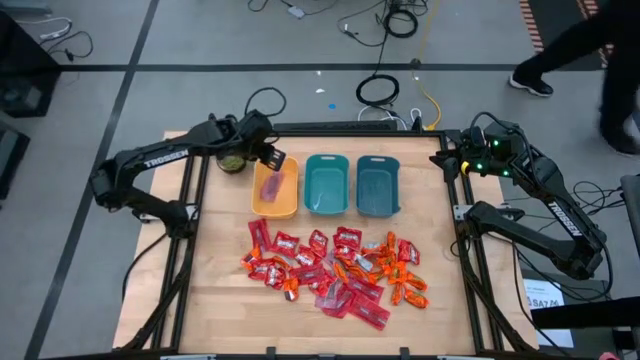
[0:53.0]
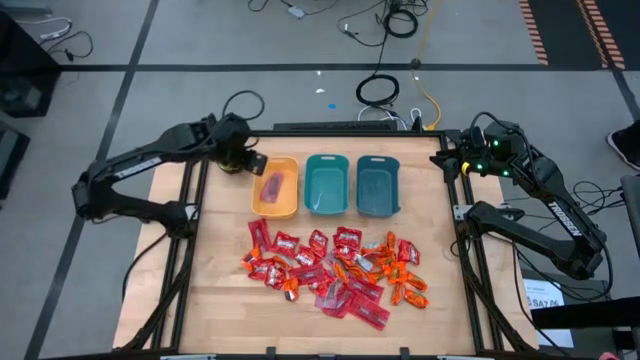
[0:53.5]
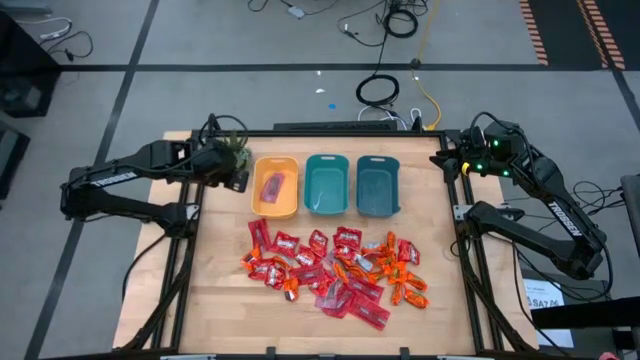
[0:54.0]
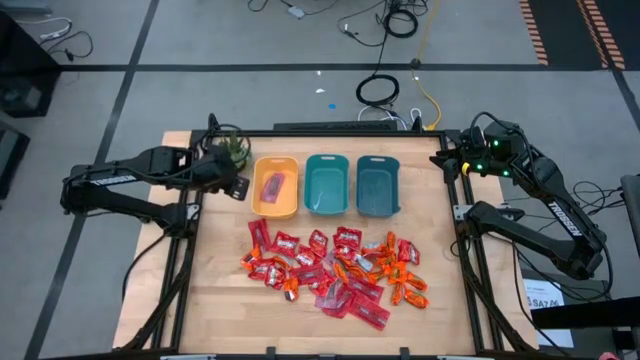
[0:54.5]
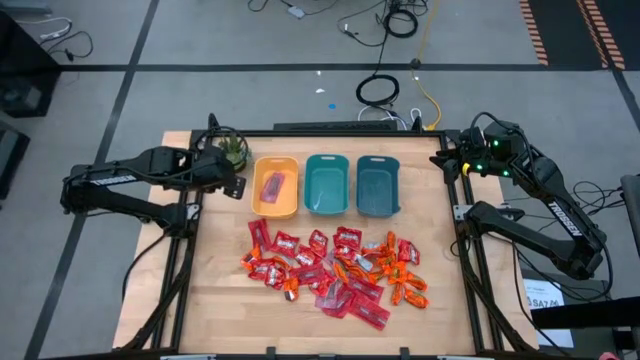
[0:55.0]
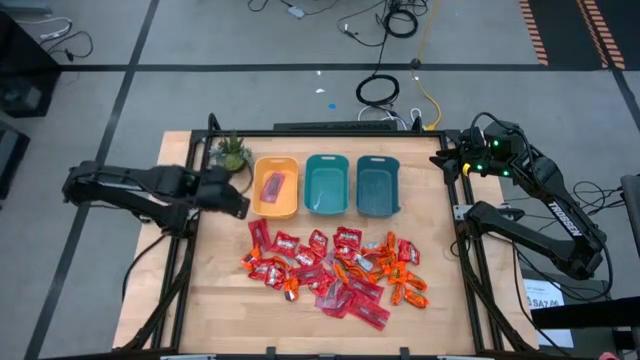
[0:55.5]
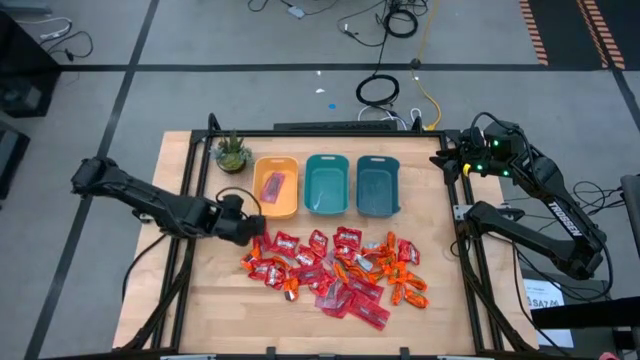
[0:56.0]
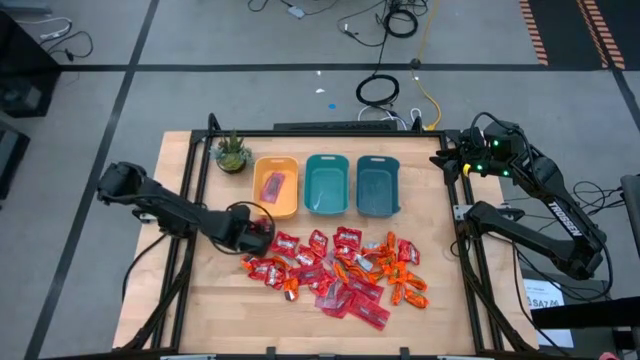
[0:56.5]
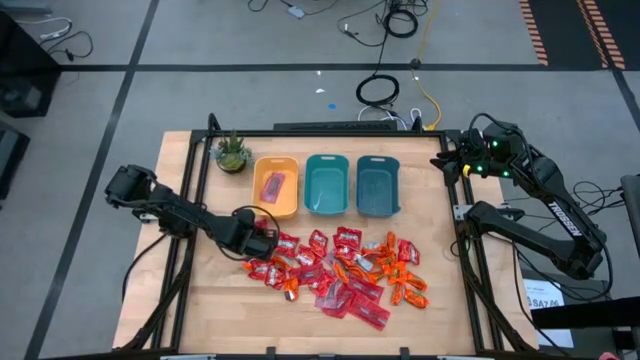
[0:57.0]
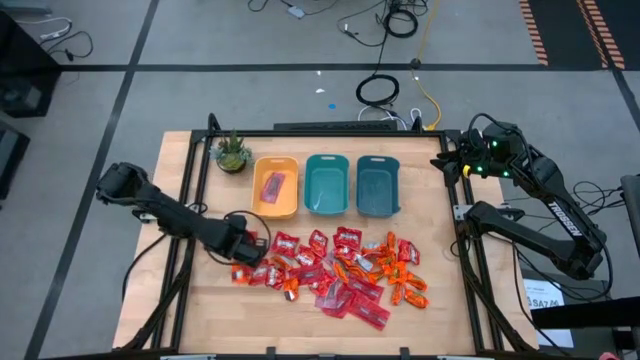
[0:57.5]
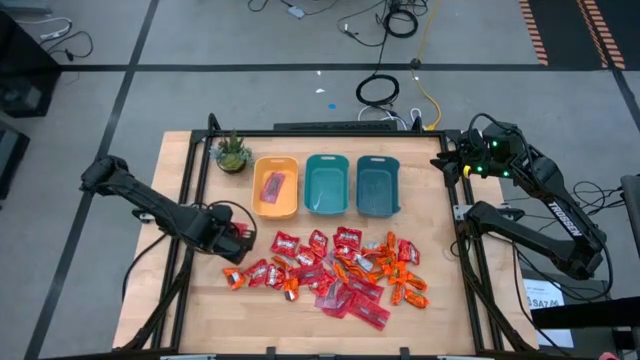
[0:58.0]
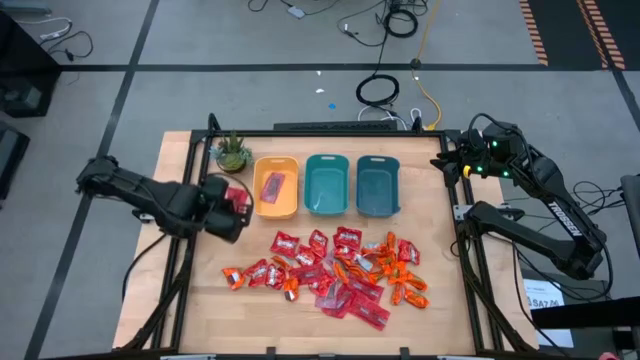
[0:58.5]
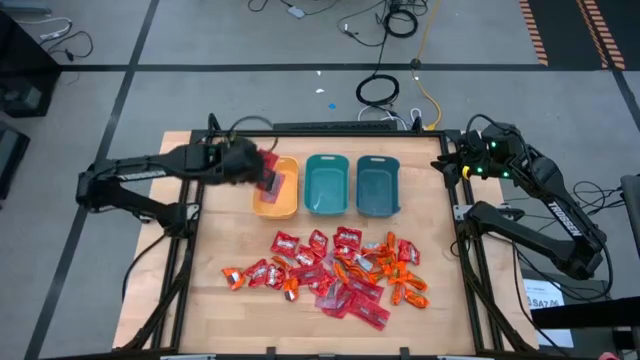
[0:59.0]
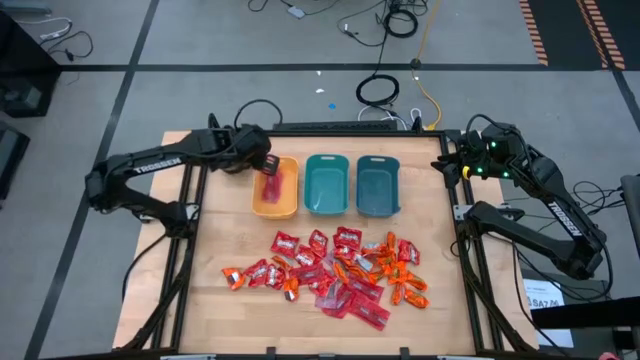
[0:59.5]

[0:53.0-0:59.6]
Task: Sort candy
Put the red candy into the top left yellow bin

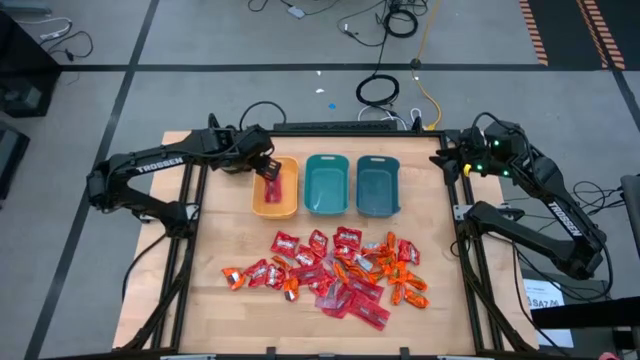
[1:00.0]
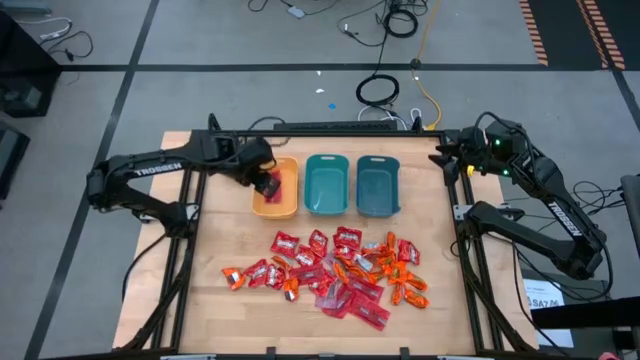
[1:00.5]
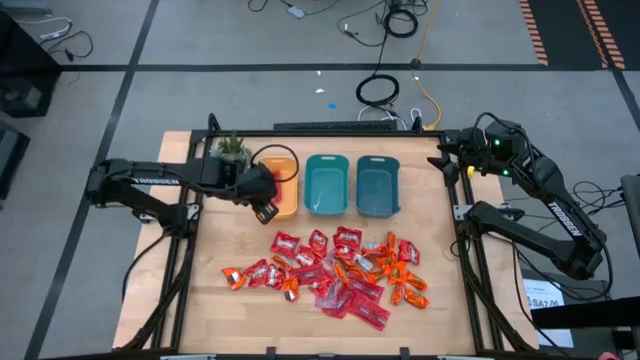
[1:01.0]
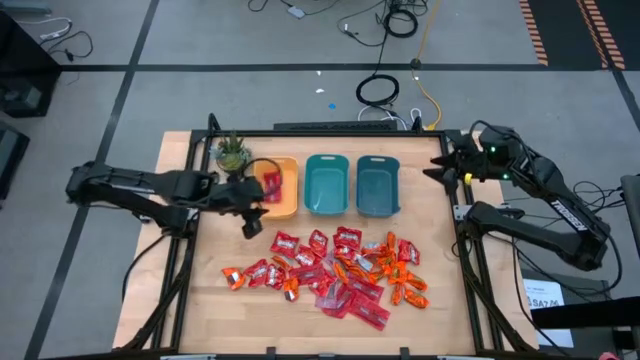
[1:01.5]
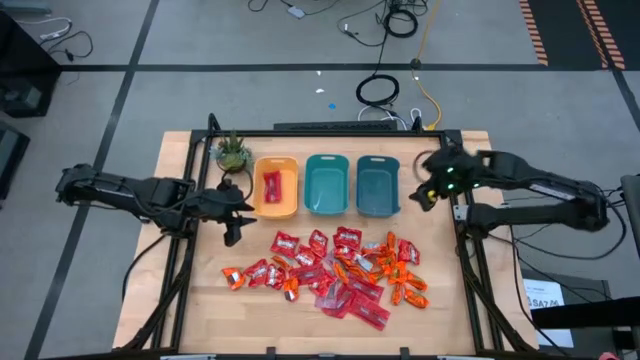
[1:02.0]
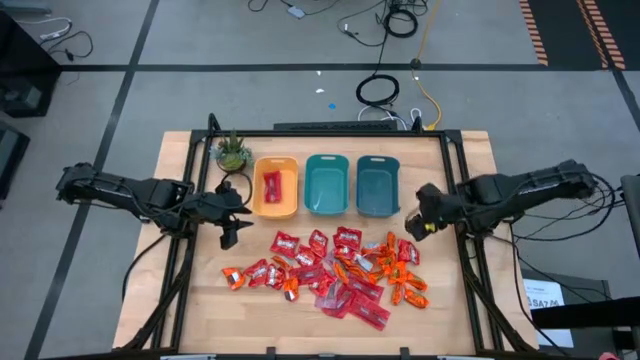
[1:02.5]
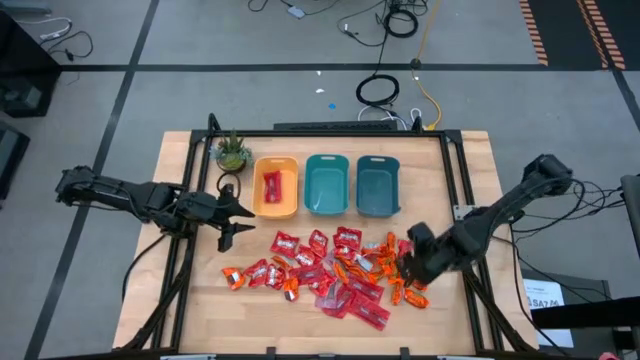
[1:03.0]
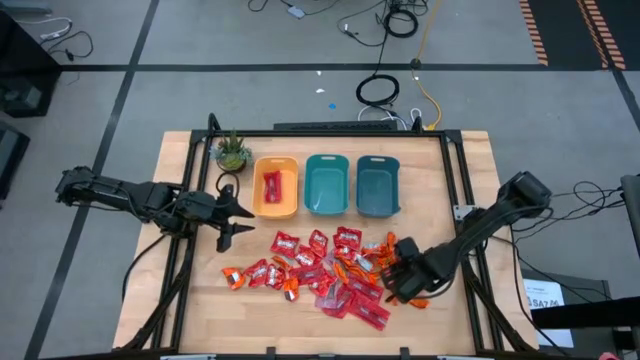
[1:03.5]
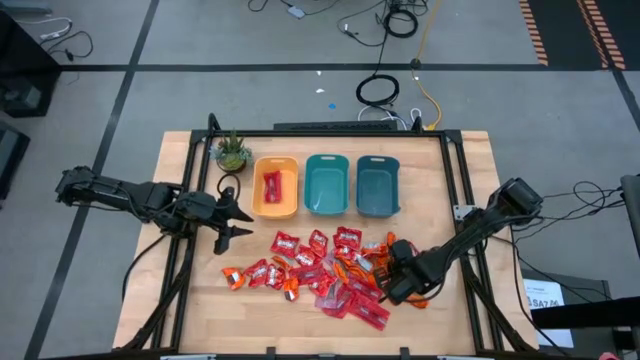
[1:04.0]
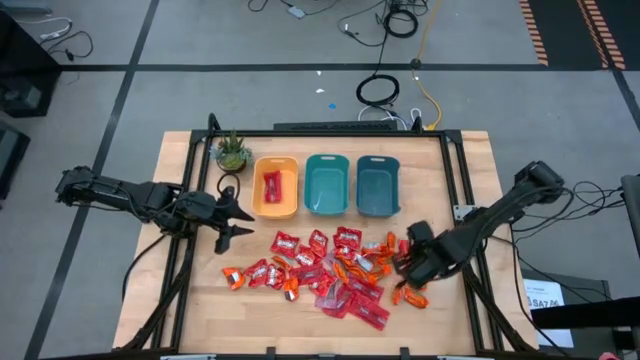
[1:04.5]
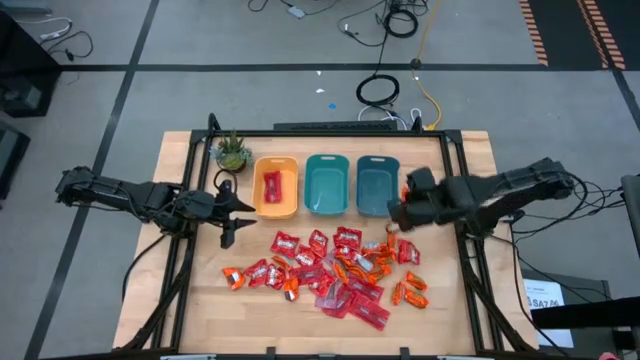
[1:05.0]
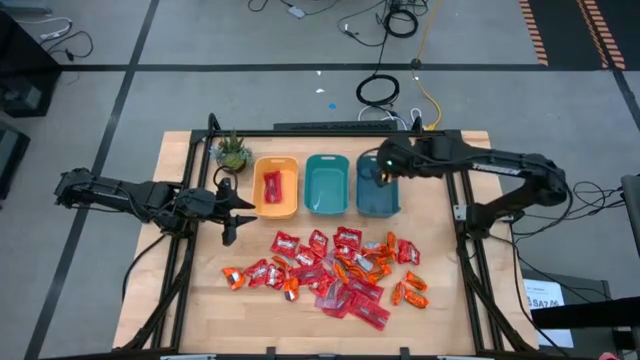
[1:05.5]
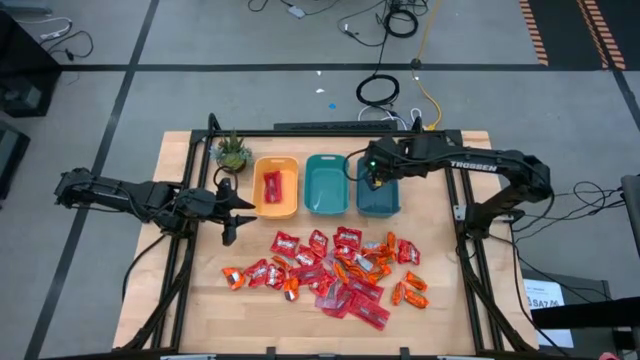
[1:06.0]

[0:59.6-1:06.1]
Put the orange candy into the top right blue bin

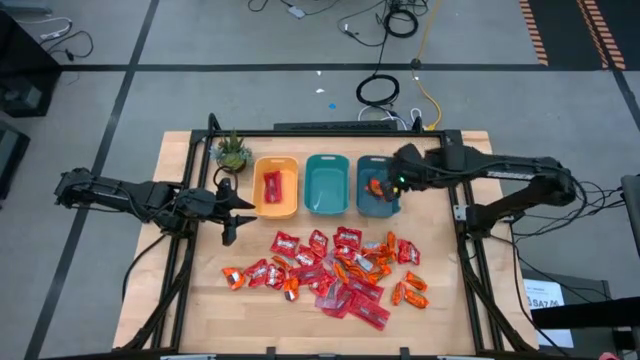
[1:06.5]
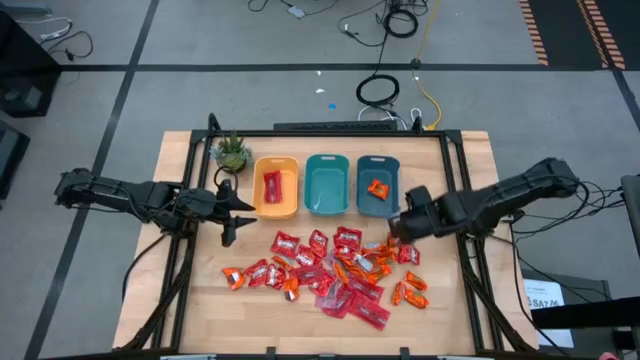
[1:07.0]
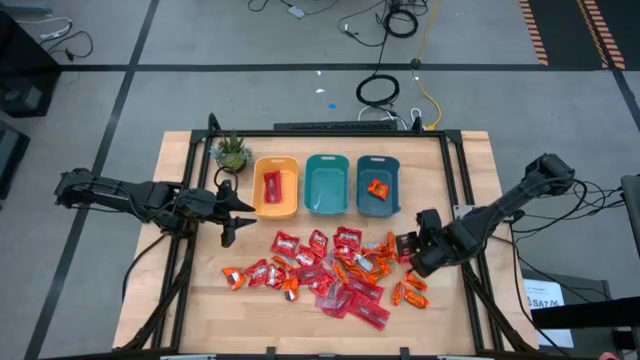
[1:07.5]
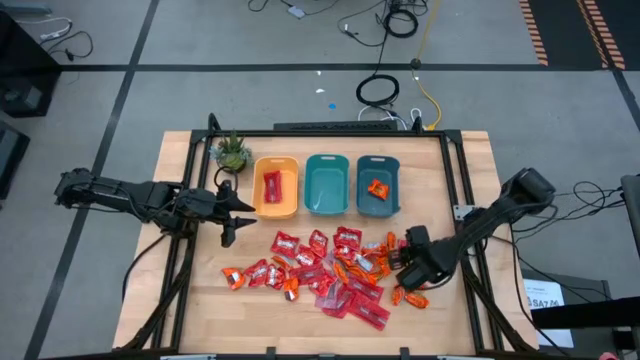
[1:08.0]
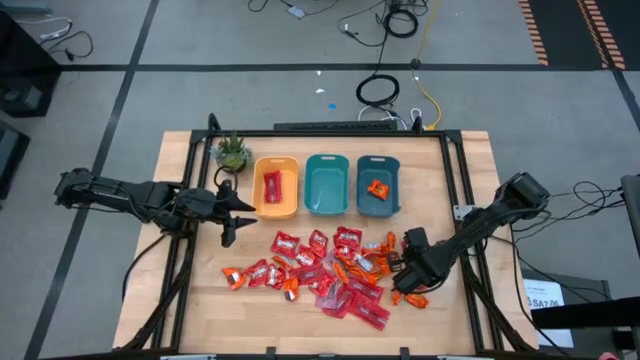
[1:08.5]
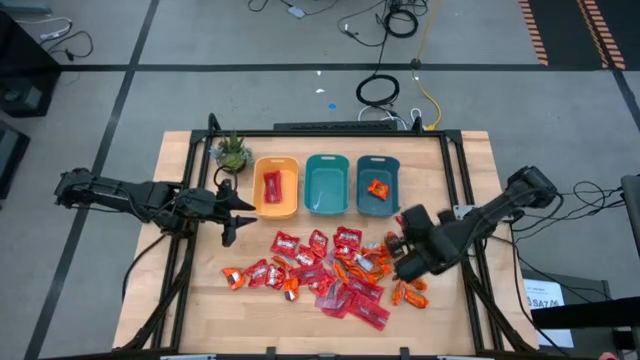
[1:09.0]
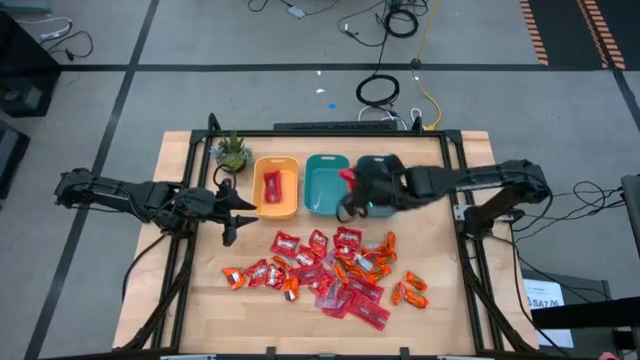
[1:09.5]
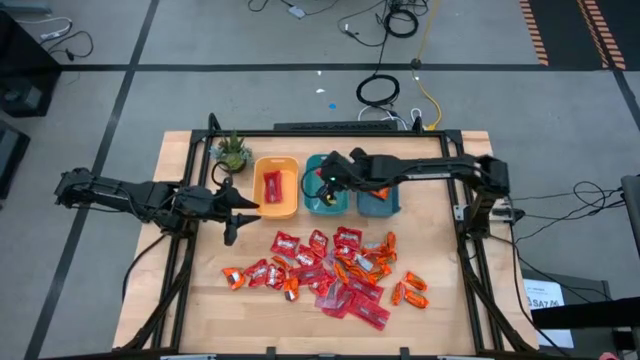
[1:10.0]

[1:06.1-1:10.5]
Put the red candy into the top center green bin

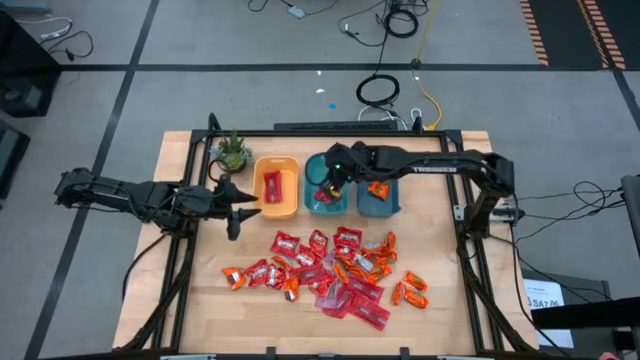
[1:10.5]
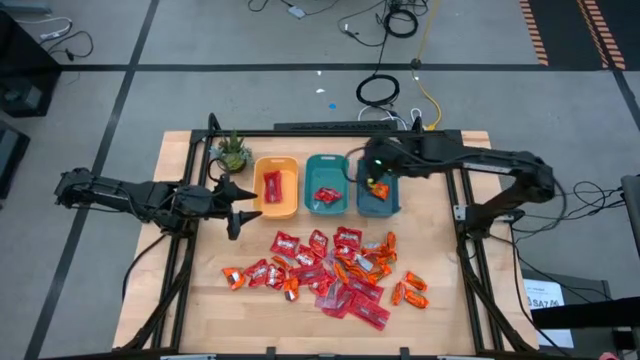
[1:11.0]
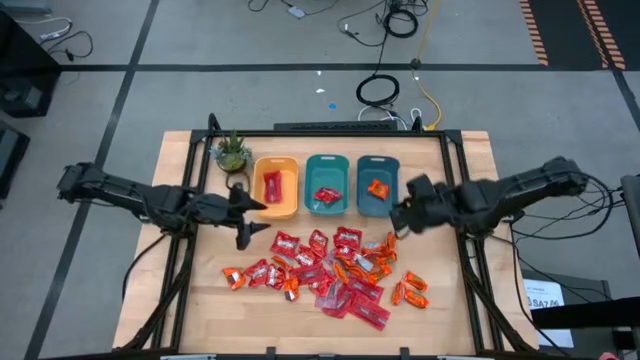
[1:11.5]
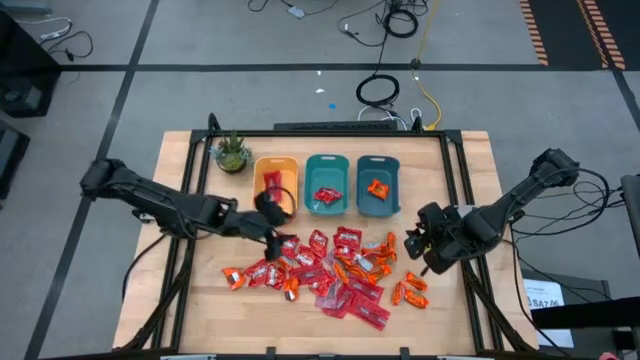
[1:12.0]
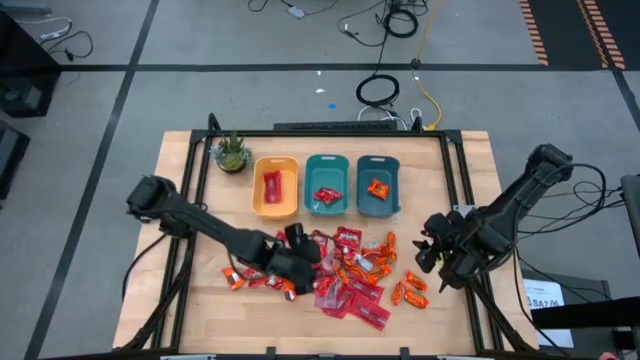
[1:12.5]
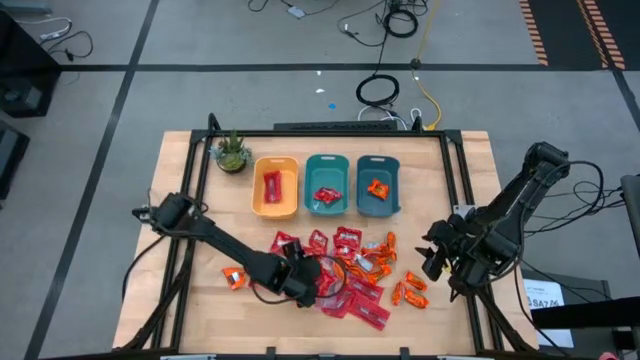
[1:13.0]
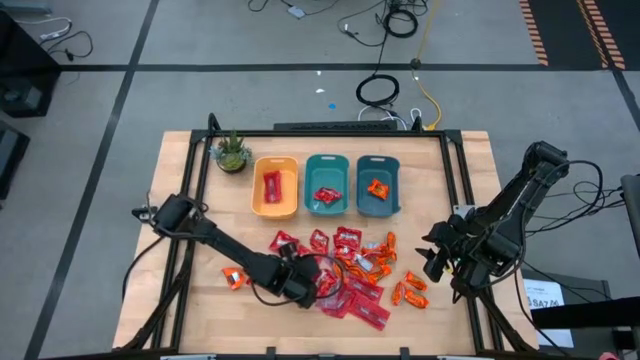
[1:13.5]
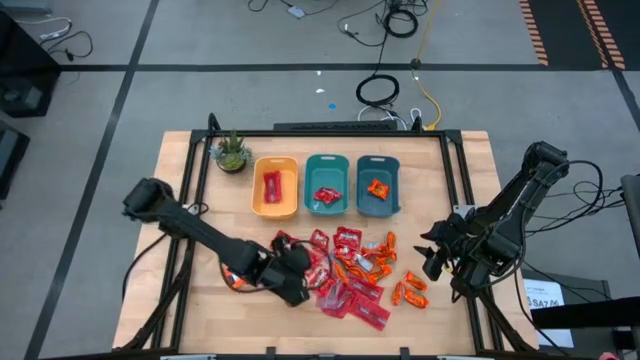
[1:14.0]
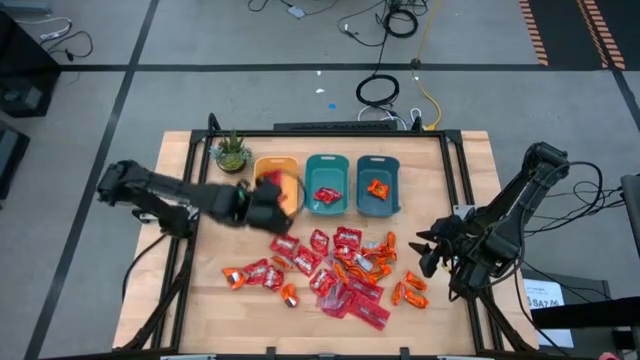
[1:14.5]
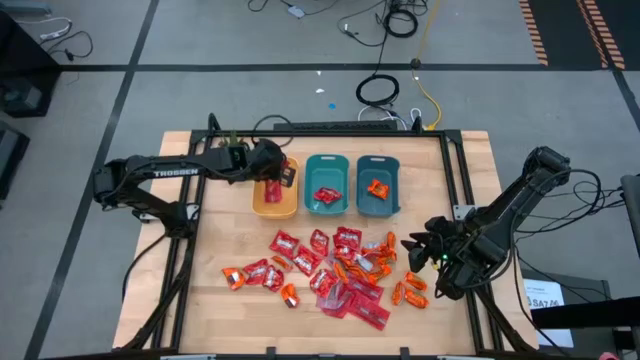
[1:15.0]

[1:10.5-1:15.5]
Put the red candy into the top left yellow bin
